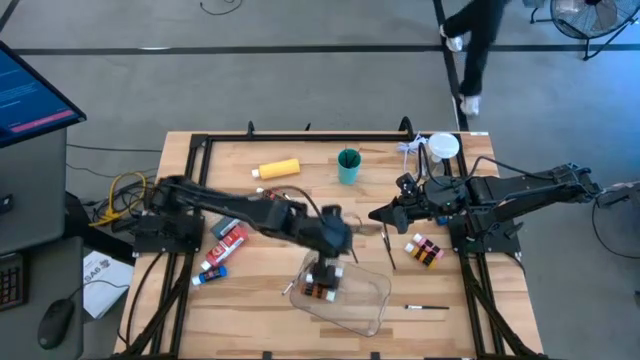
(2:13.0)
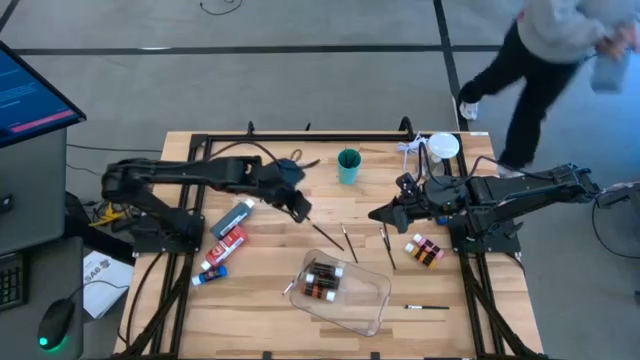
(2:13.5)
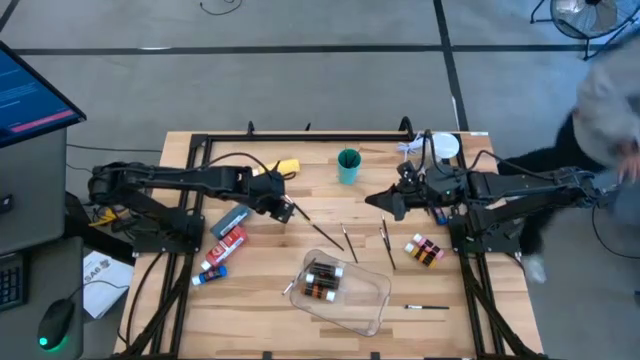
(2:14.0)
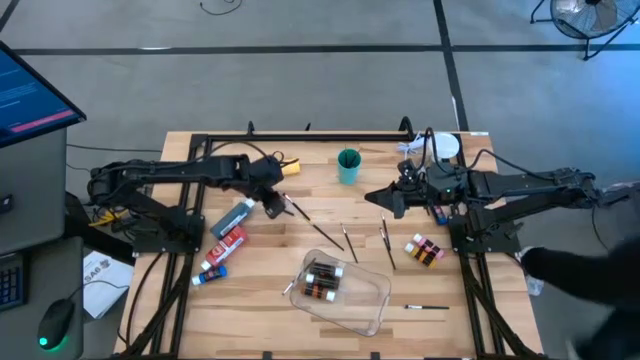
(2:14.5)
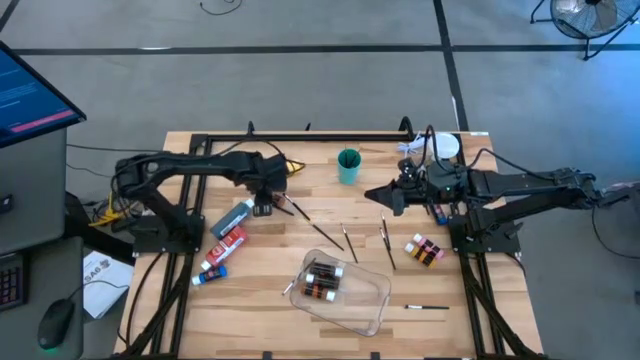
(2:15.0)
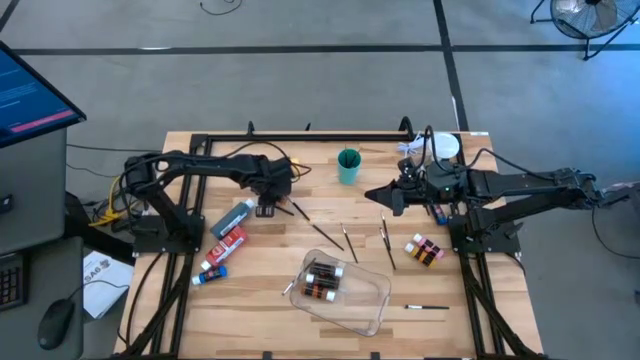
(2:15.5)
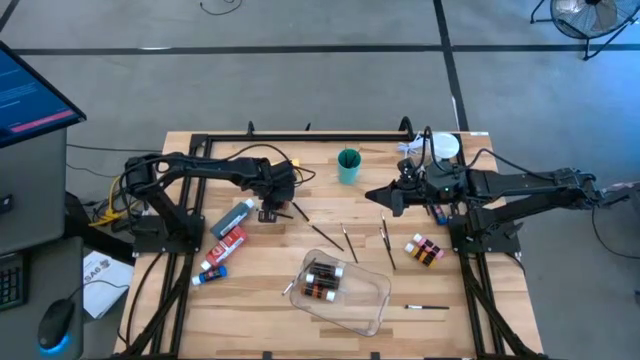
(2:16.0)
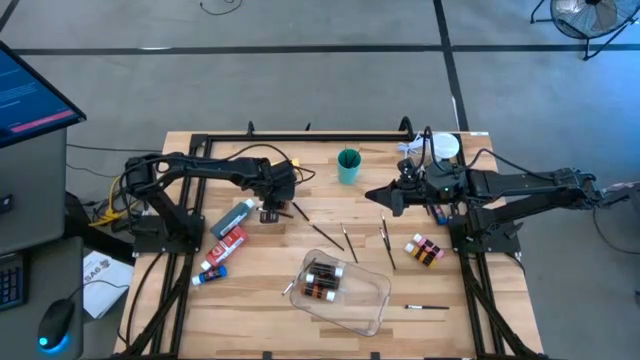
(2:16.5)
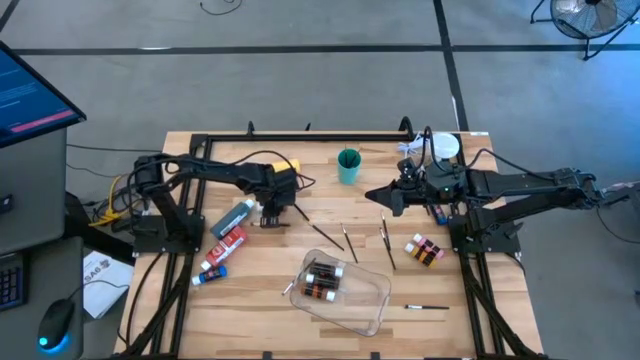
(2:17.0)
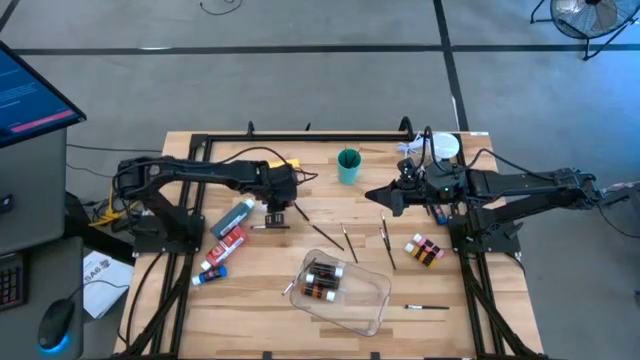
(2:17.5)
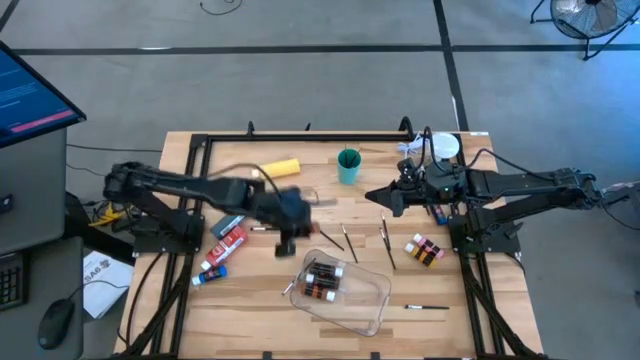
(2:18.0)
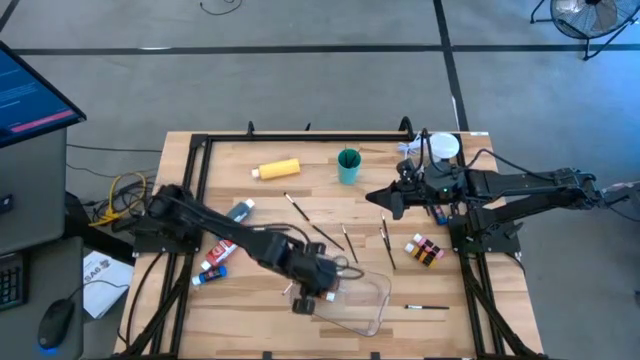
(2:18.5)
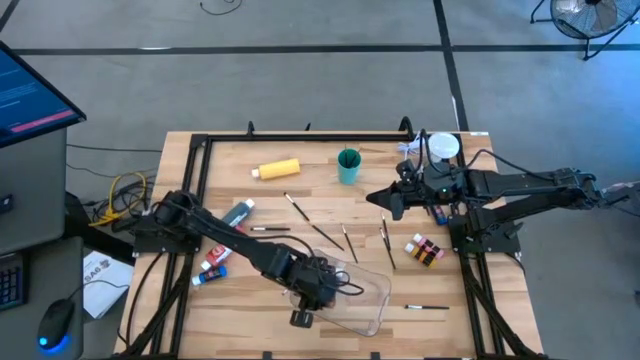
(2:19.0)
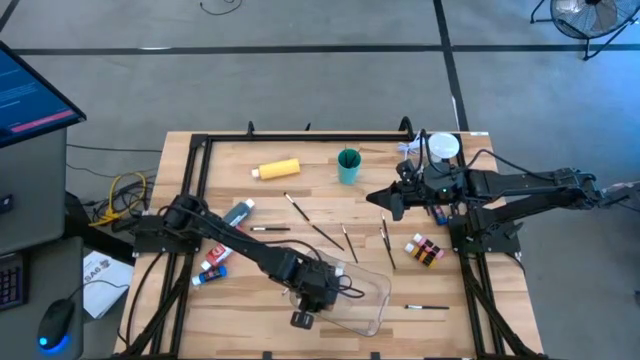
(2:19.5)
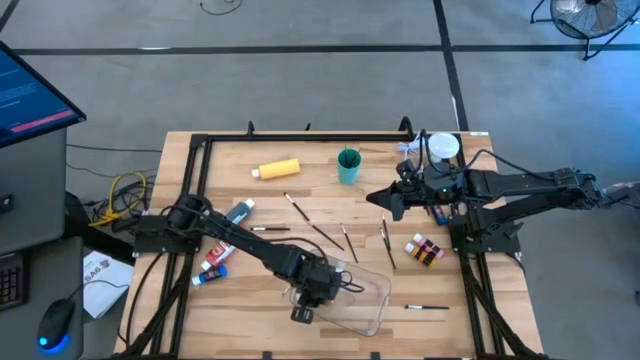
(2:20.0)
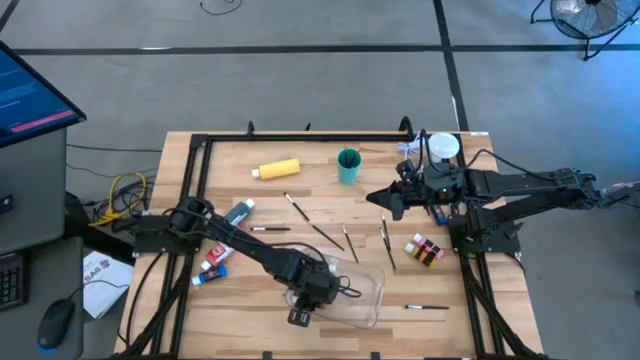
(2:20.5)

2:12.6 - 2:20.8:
Task: Pick & Place Paint Supplies
Put the brown paint bottle into the transparent bin

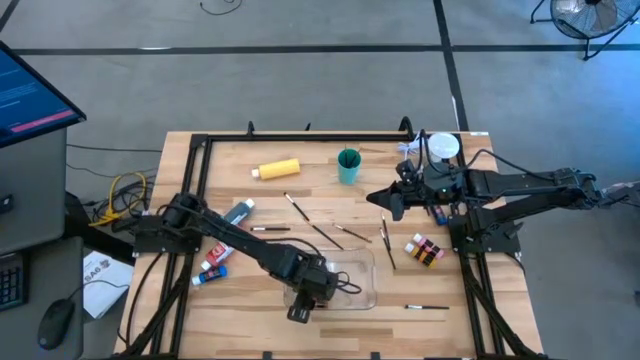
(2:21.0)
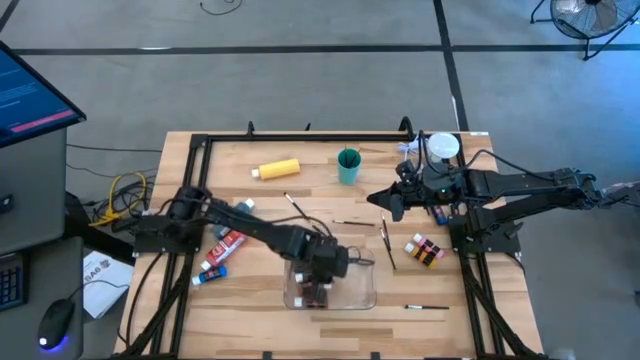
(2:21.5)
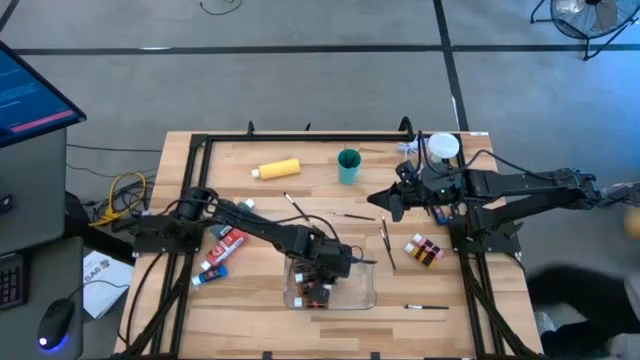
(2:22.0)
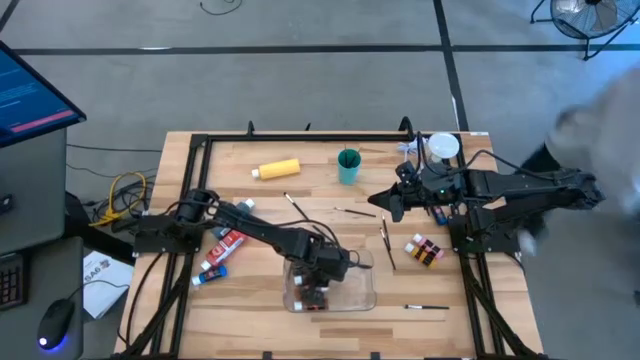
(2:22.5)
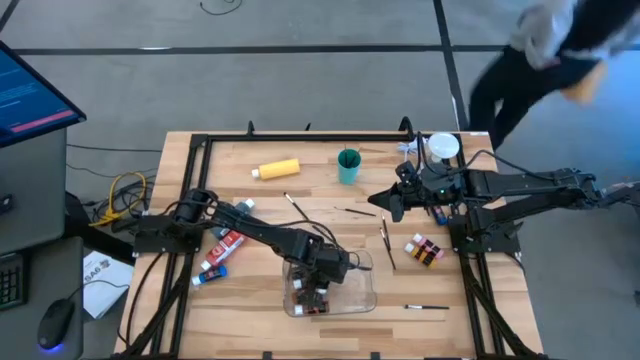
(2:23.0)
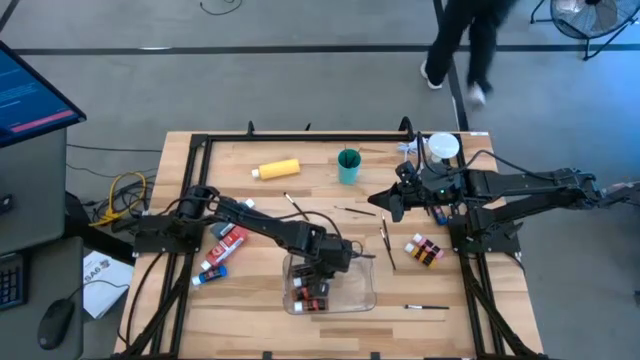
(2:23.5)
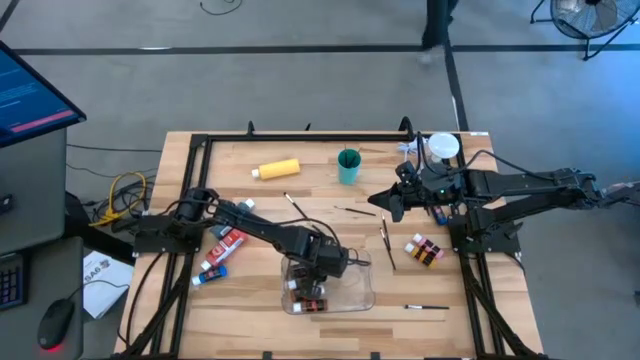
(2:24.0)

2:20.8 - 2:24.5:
Adjust the paint bottles in the transparent bin

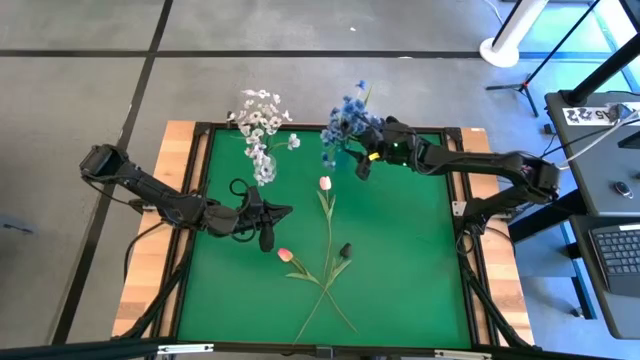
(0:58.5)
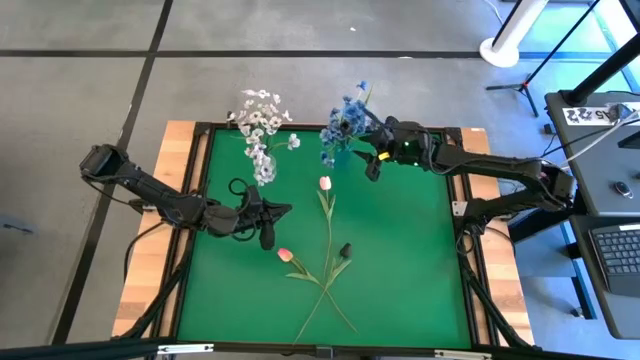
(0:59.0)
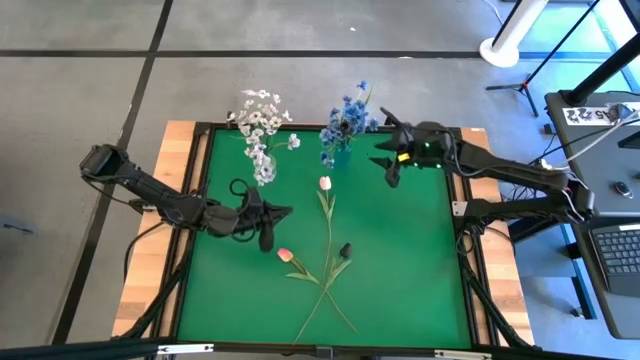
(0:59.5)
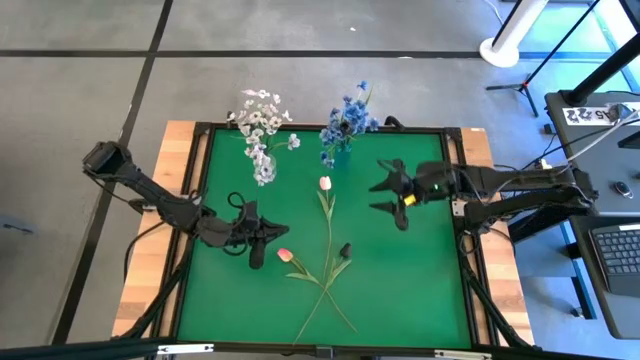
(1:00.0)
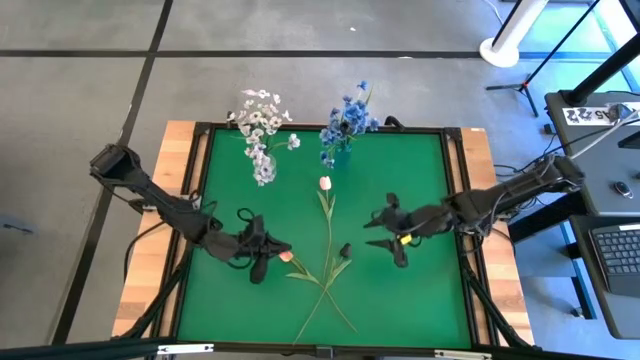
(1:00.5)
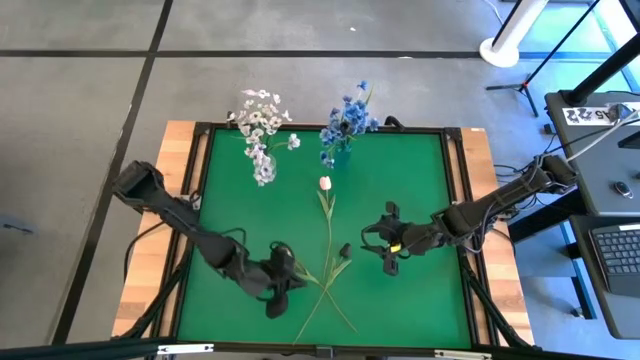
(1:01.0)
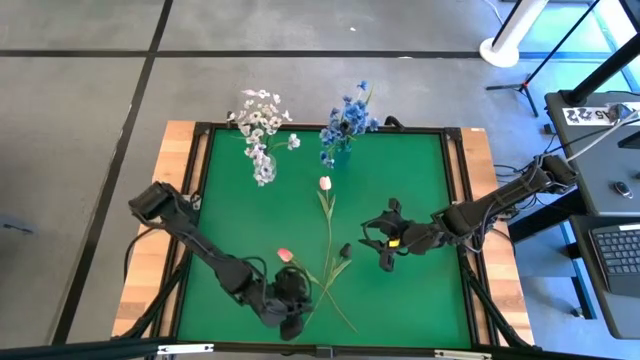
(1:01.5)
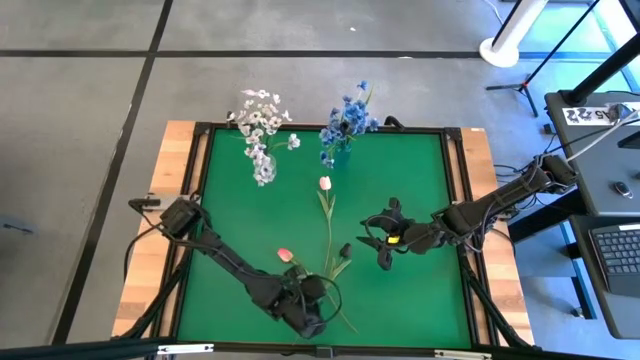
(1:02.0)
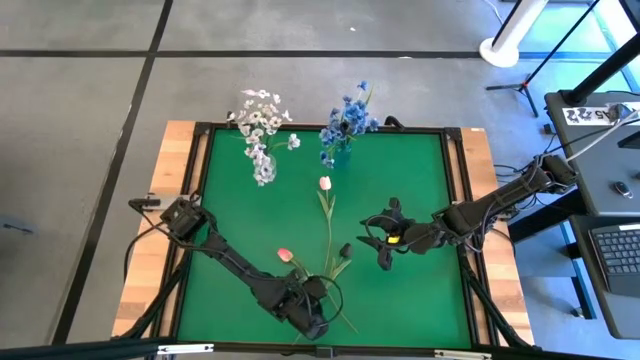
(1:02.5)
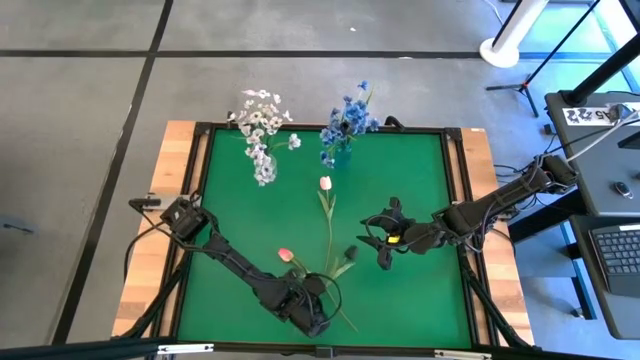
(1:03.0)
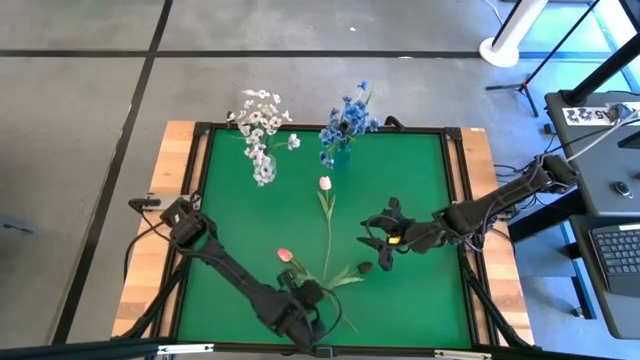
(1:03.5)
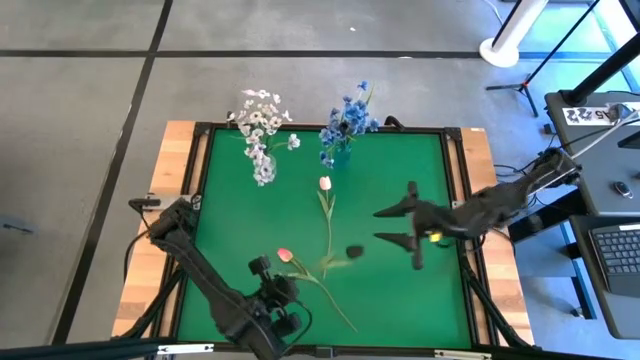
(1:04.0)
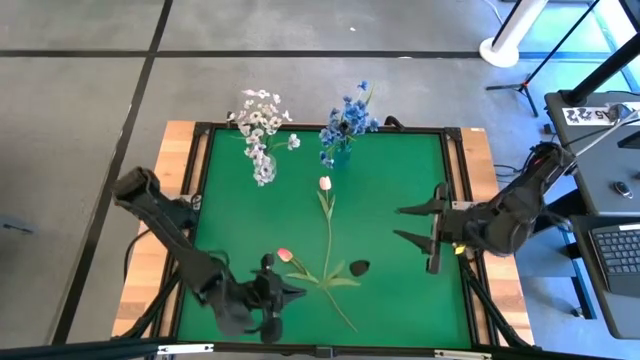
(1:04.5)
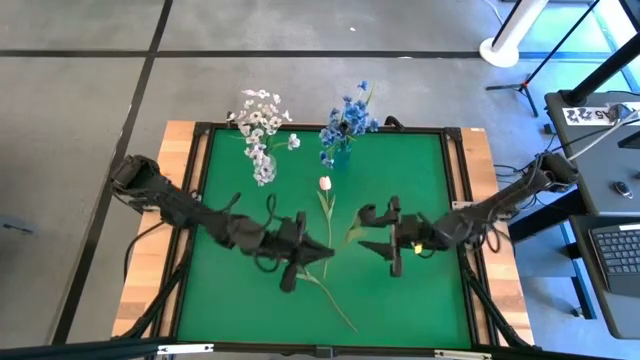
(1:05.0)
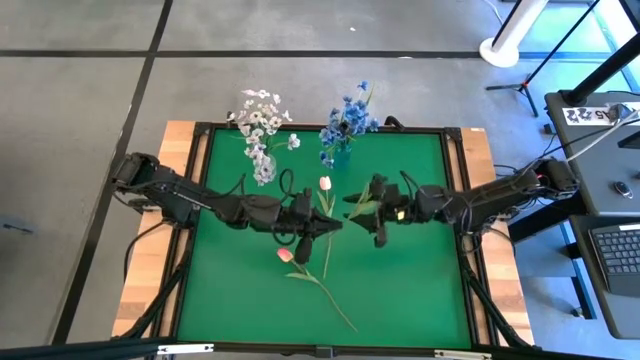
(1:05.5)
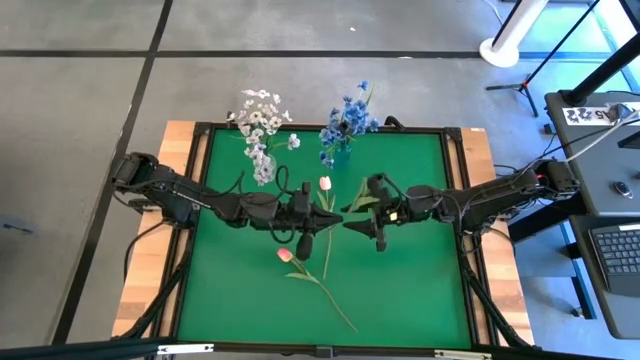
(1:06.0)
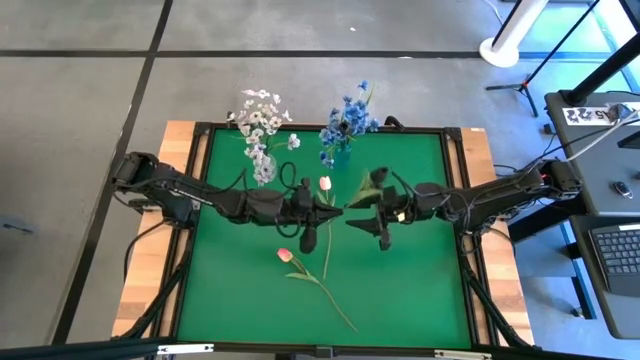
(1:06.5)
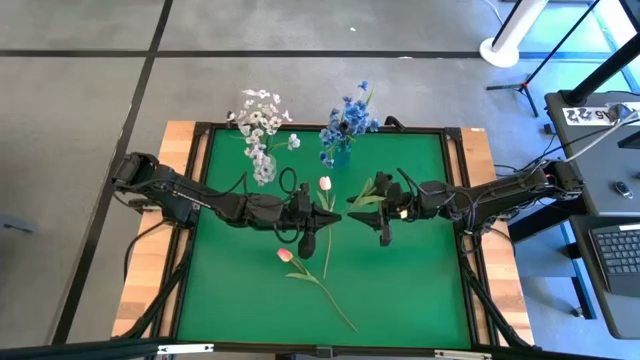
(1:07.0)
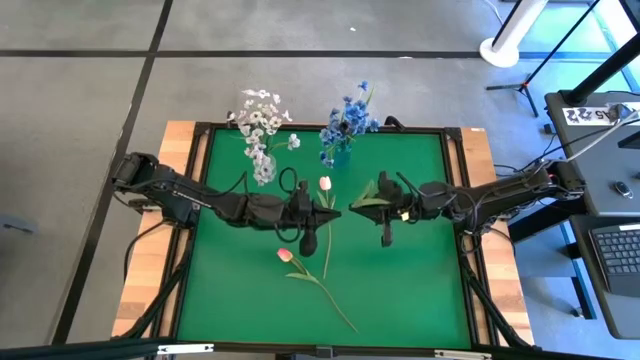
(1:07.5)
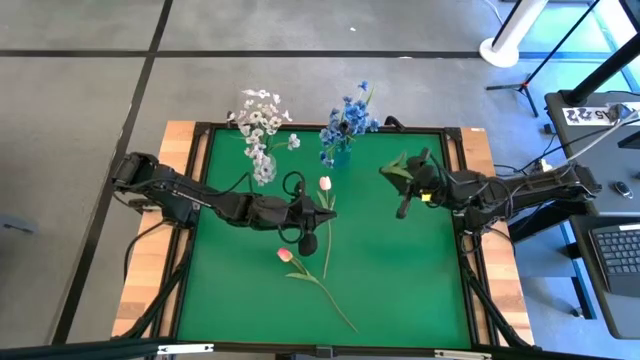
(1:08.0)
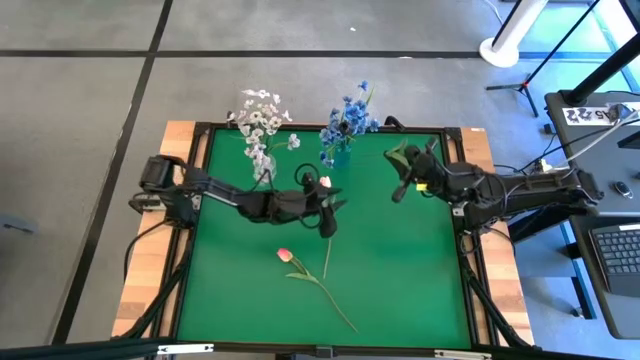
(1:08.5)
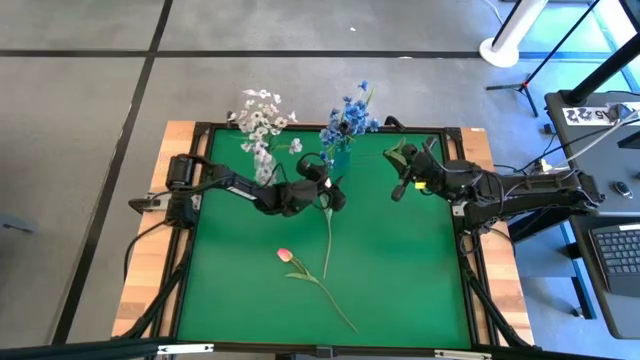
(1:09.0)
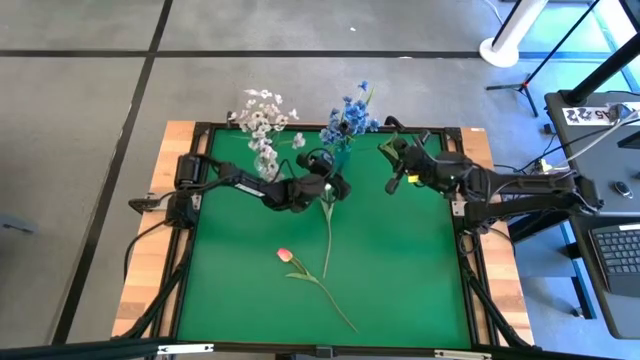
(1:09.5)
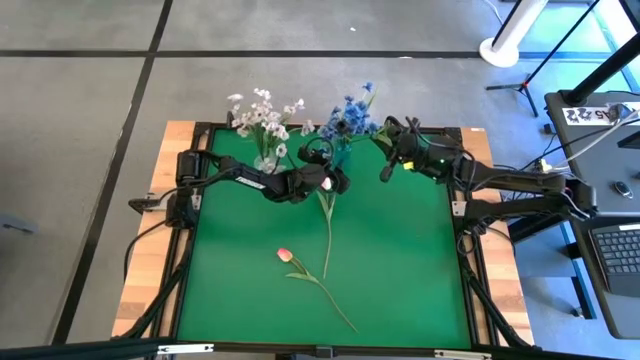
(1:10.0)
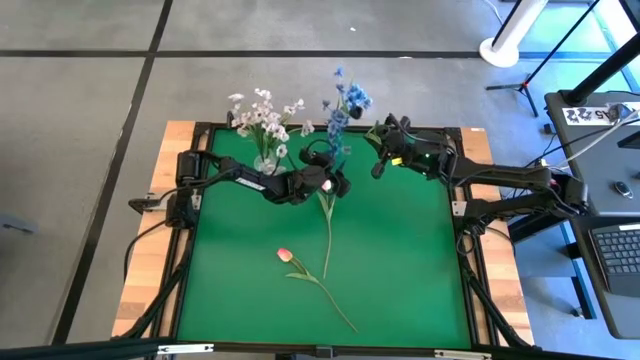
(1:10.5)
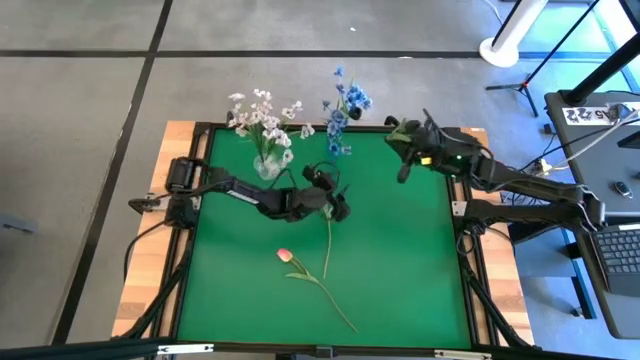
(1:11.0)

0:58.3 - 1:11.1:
Task: Sort flowers into vase by color
Put the black flower into the blue vase
